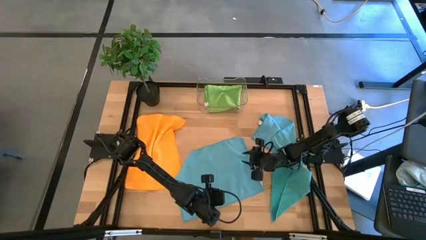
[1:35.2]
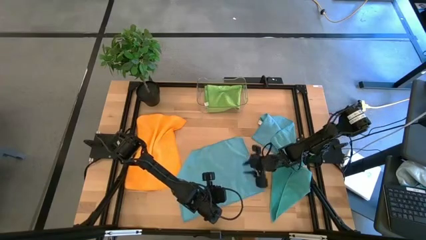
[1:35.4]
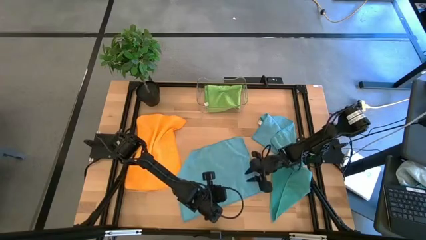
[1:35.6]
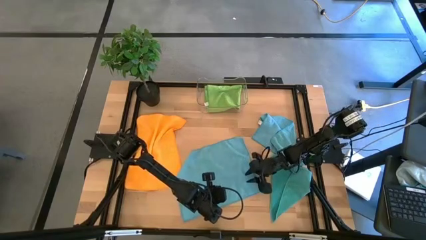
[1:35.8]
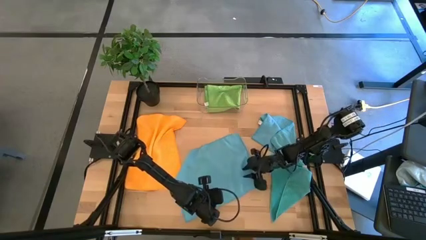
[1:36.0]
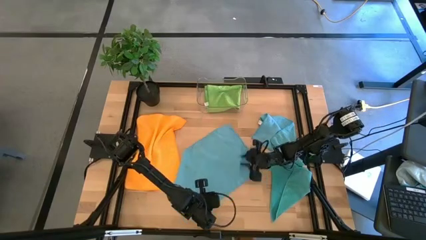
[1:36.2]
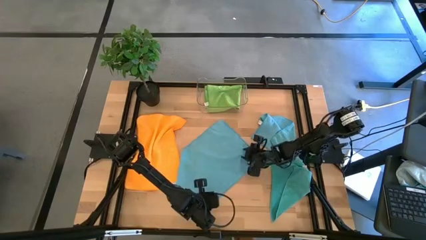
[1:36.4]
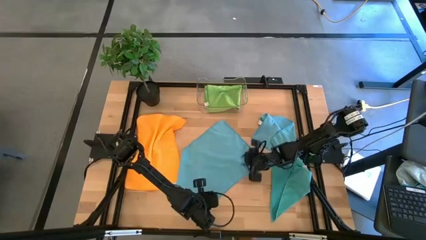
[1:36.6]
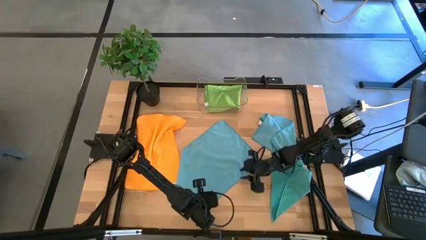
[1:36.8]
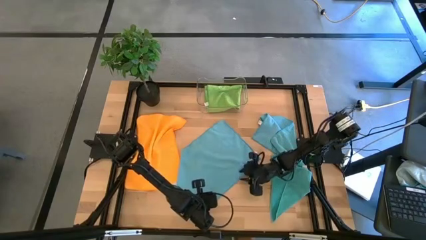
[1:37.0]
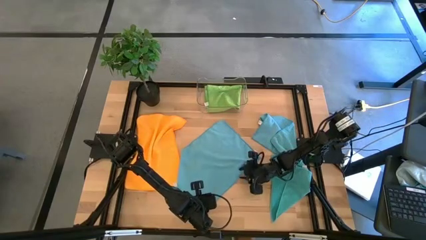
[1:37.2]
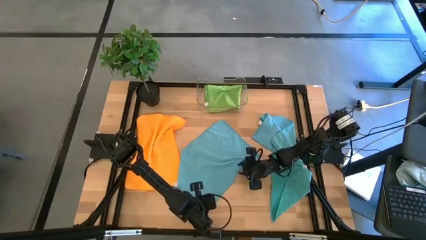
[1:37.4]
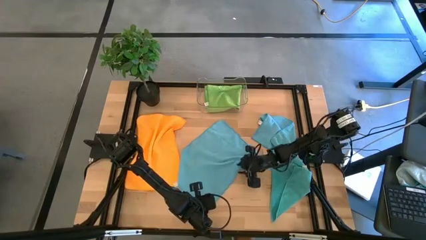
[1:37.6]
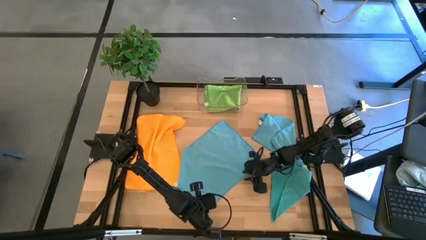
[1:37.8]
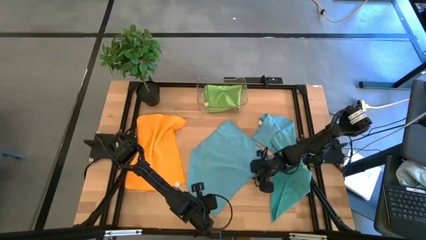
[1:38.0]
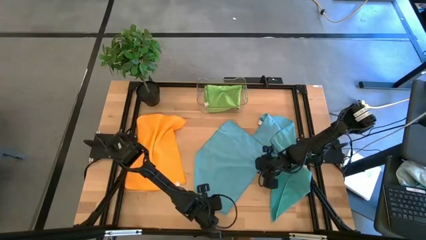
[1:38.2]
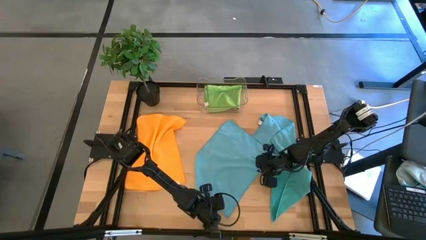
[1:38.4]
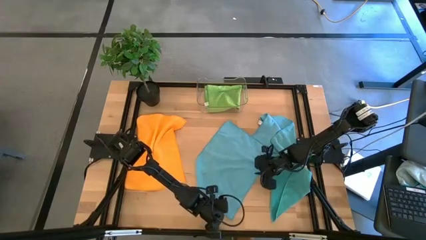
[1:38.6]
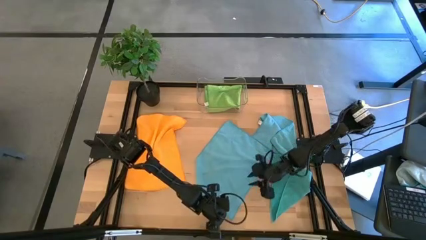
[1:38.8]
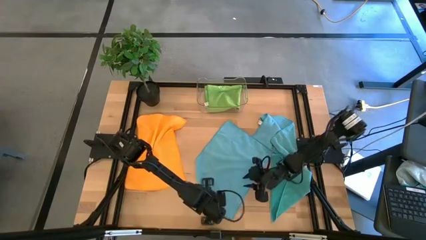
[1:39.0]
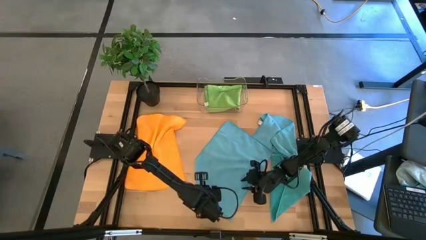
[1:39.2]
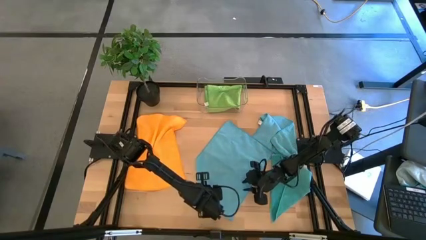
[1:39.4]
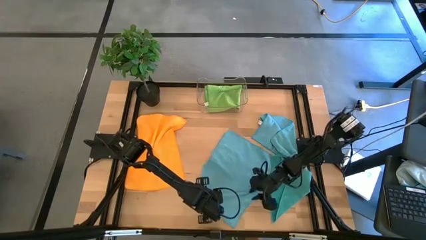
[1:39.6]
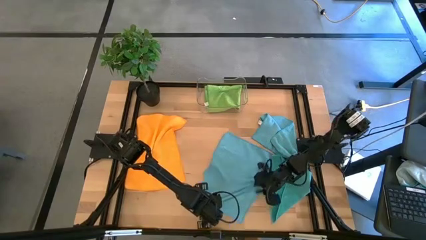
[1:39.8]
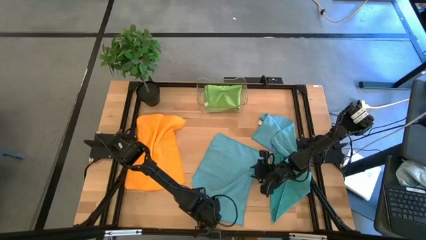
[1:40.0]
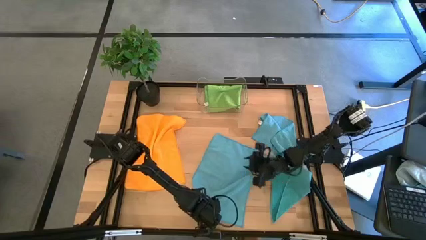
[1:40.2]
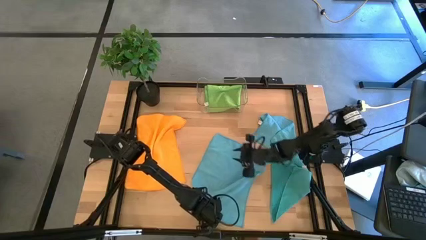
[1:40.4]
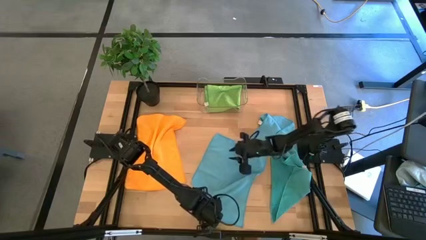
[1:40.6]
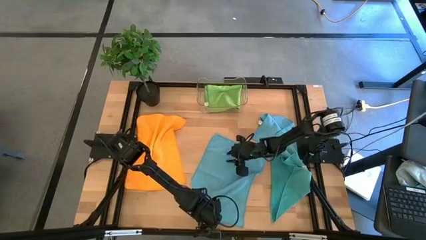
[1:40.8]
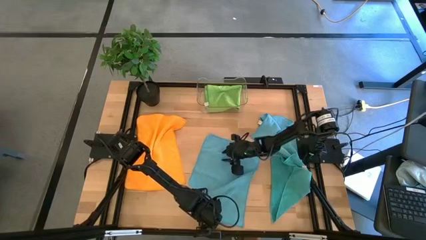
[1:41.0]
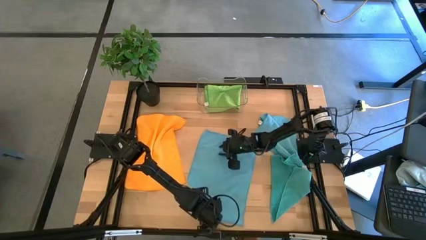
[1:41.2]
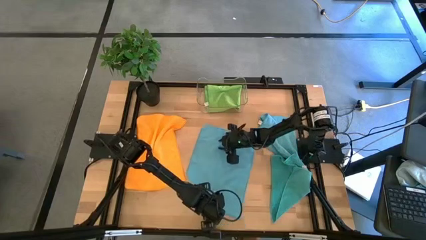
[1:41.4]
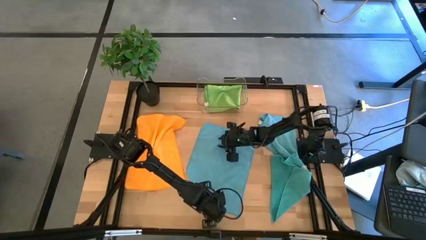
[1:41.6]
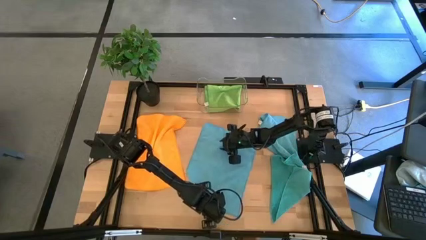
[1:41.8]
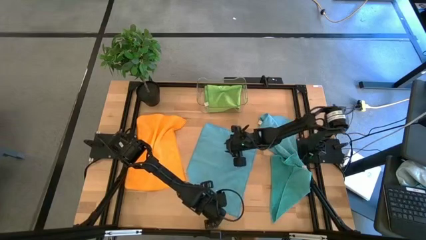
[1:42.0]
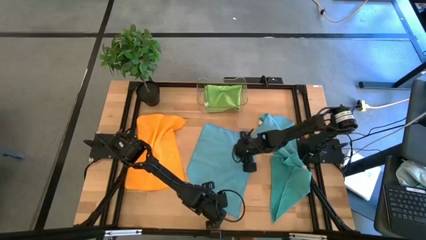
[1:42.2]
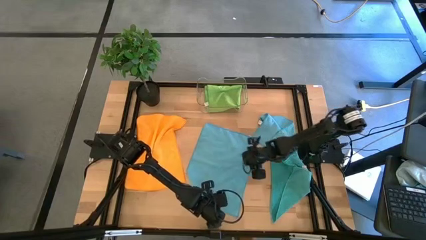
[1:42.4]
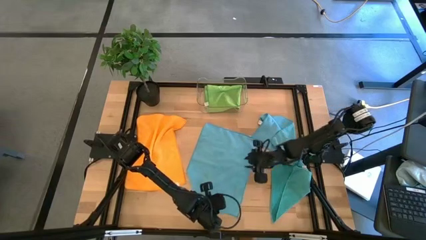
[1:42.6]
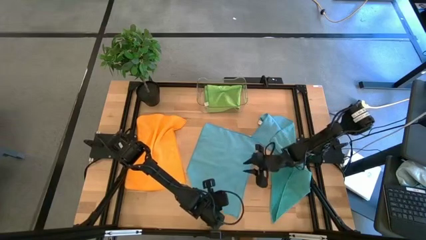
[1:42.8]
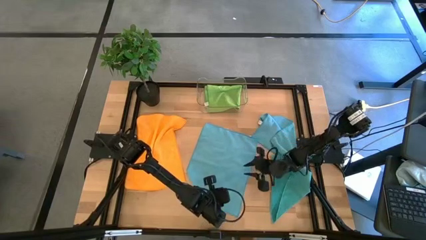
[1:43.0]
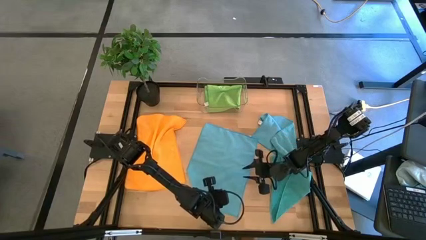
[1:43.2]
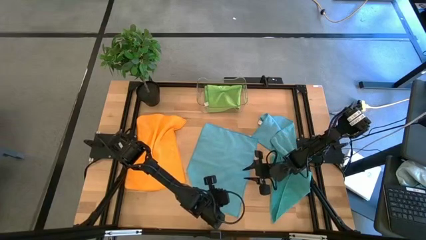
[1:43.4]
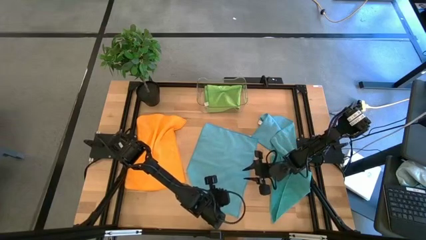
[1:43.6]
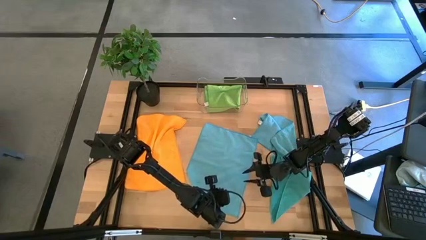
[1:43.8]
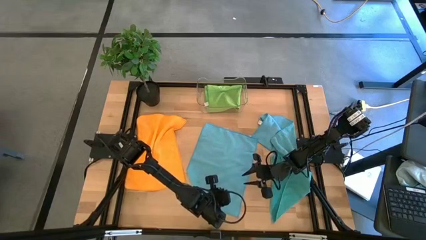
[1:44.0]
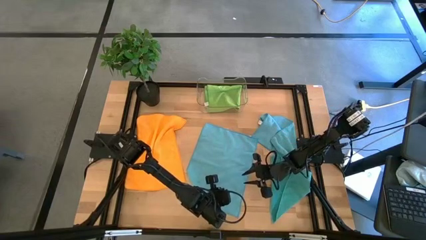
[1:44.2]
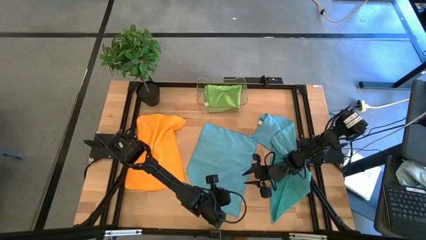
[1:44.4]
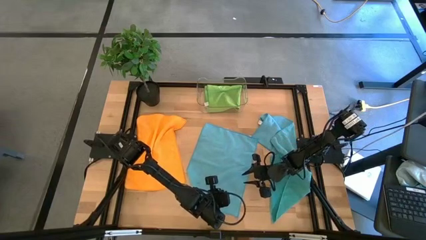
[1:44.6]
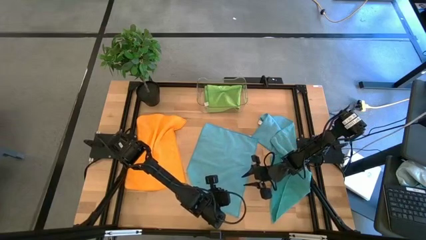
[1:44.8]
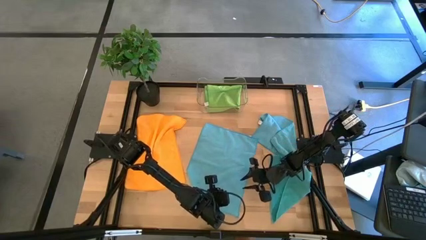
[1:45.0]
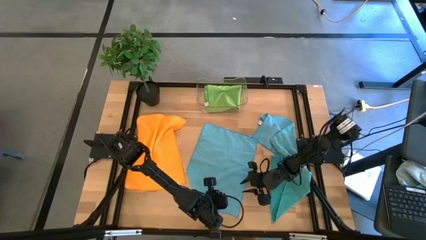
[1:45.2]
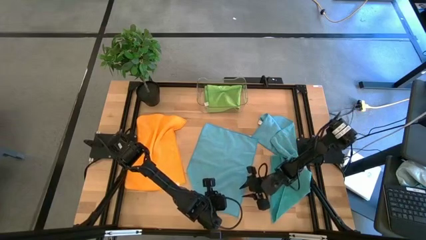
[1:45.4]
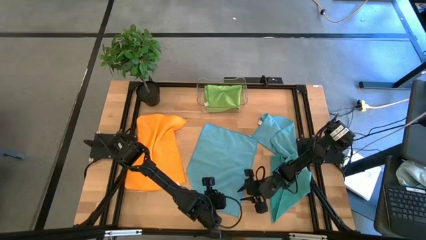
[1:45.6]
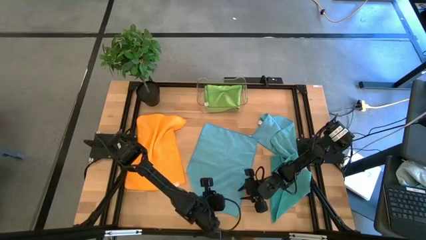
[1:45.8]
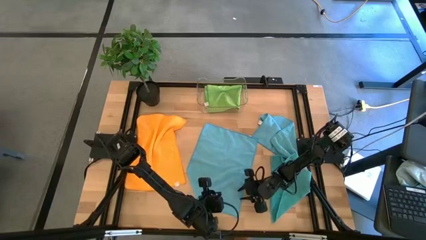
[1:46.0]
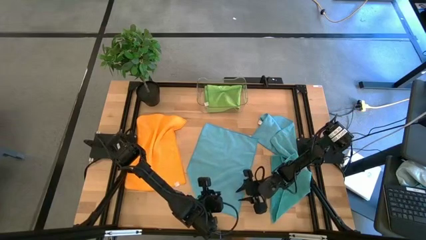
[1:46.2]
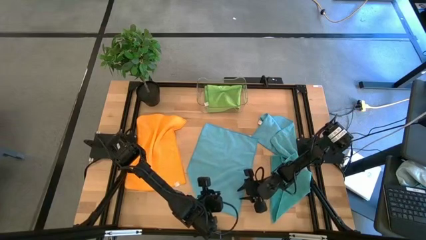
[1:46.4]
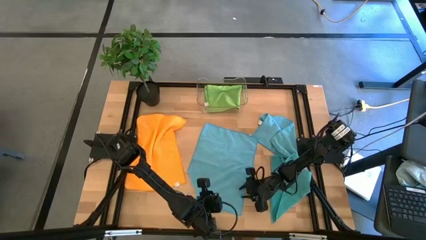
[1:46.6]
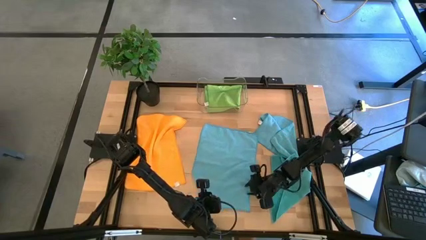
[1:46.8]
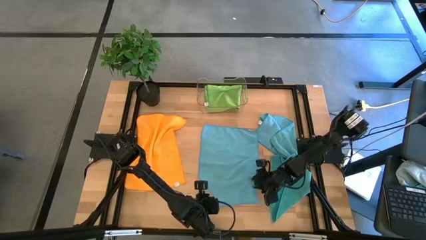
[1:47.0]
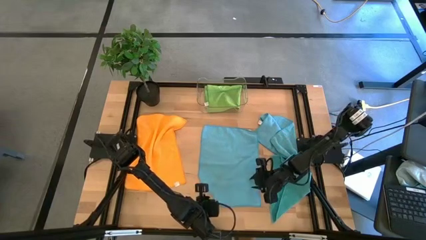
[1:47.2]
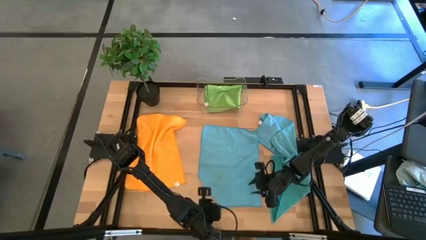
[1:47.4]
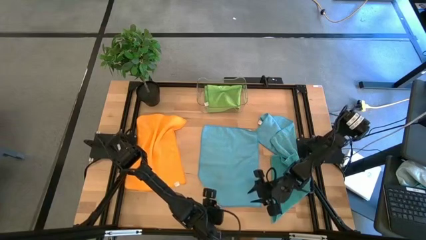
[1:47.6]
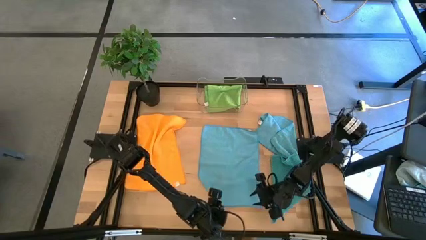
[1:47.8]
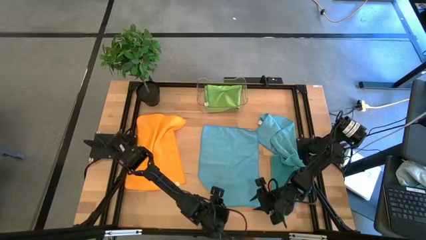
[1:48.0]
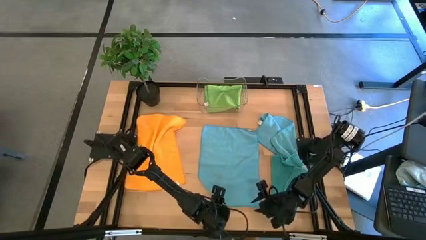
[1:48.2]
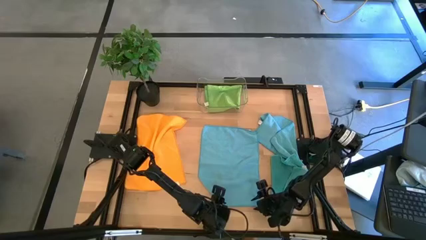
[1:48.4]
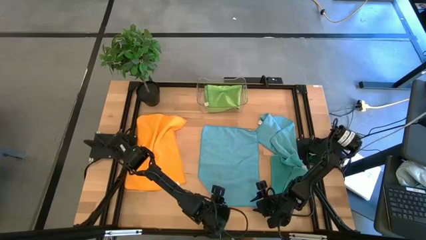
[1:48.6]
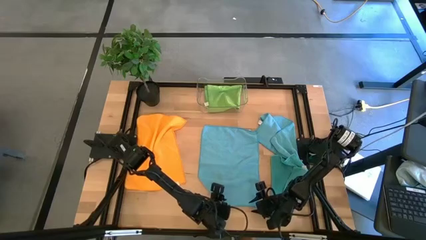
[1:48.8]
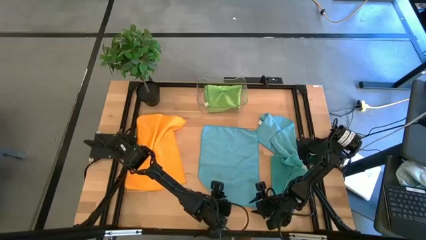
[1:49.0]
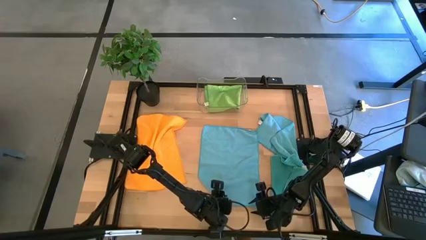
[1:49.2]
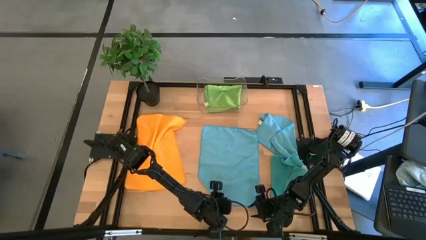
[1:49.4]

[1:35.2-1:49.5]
Task: Fold microfiber towels
Fold the top left blue microfiber towel
